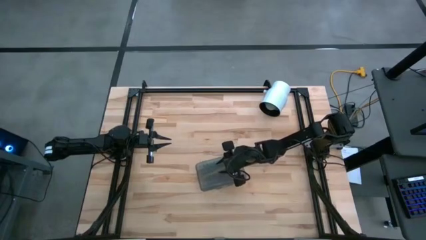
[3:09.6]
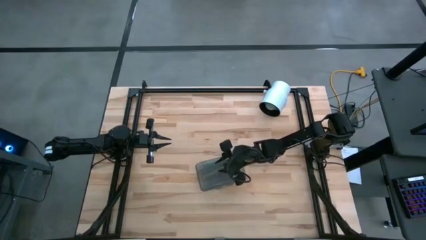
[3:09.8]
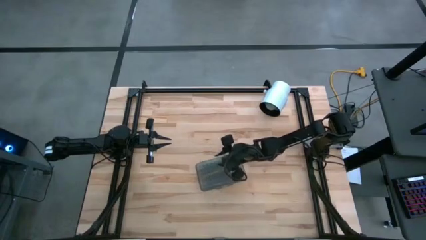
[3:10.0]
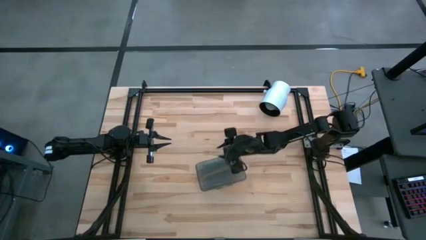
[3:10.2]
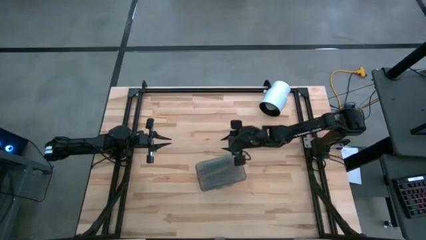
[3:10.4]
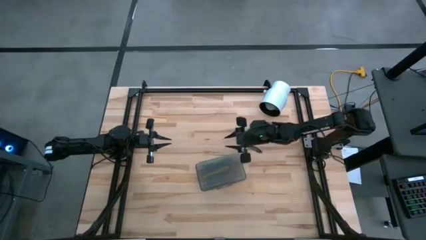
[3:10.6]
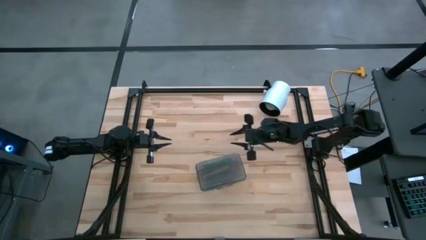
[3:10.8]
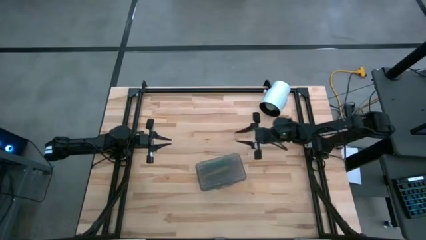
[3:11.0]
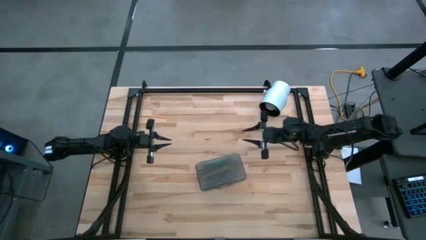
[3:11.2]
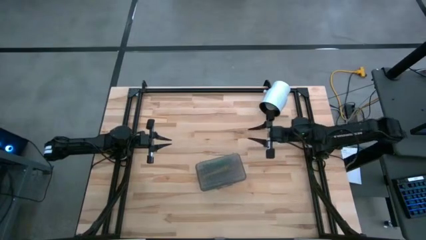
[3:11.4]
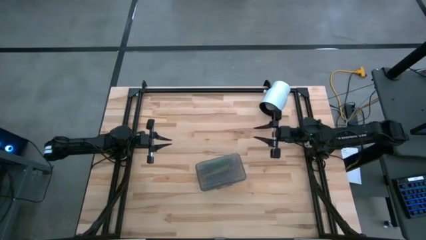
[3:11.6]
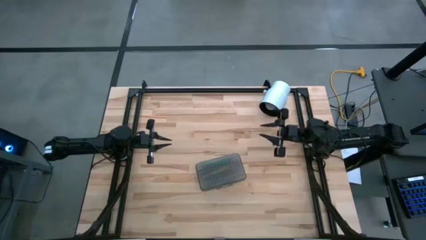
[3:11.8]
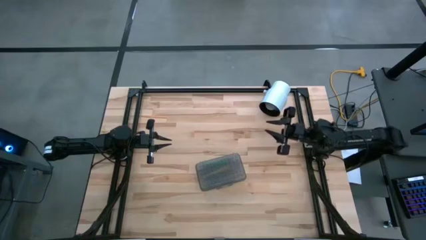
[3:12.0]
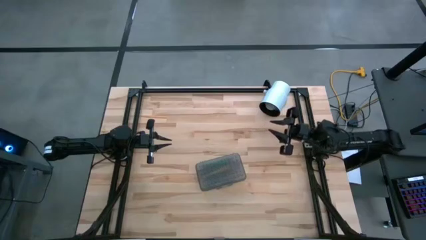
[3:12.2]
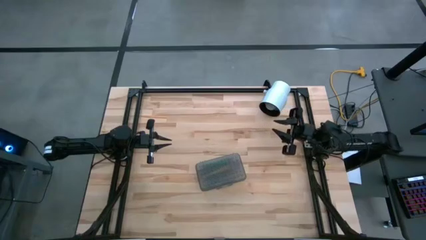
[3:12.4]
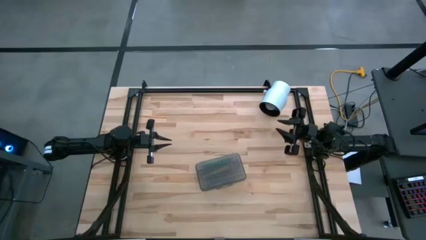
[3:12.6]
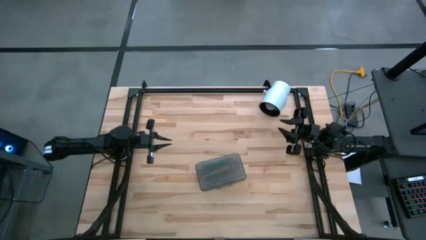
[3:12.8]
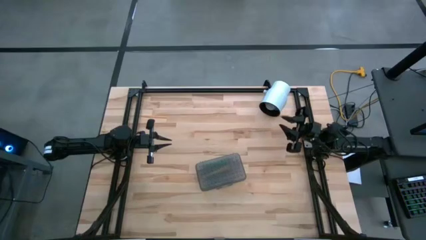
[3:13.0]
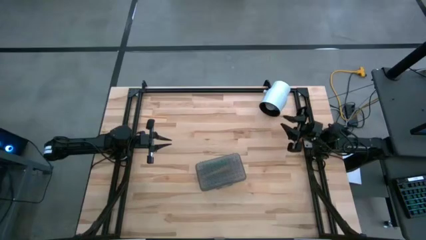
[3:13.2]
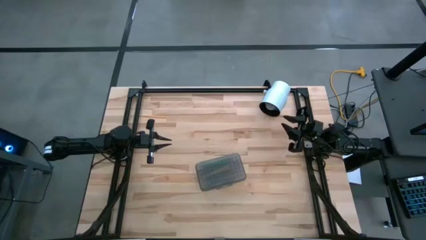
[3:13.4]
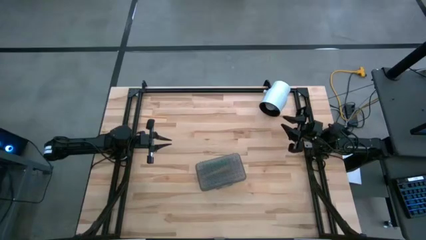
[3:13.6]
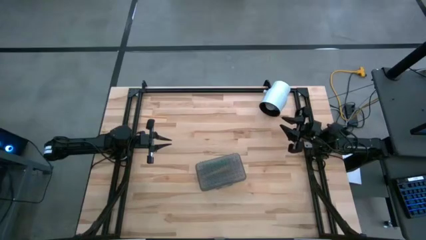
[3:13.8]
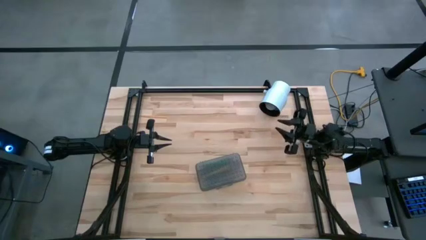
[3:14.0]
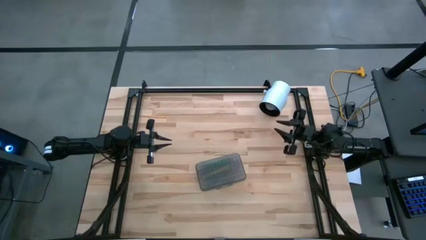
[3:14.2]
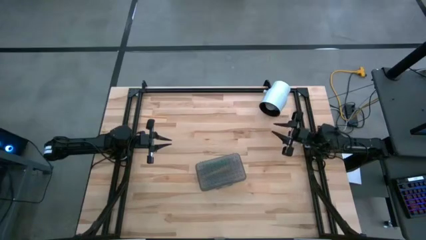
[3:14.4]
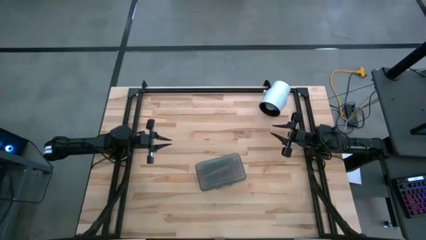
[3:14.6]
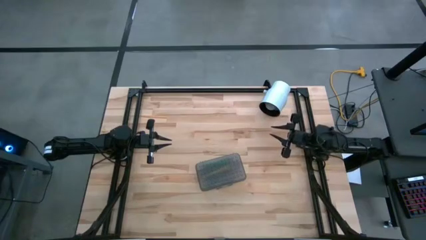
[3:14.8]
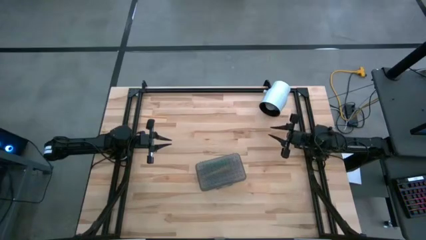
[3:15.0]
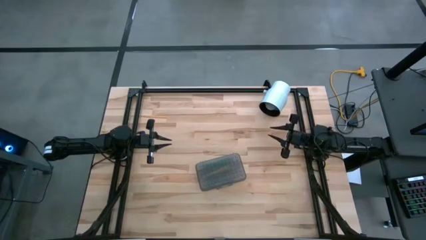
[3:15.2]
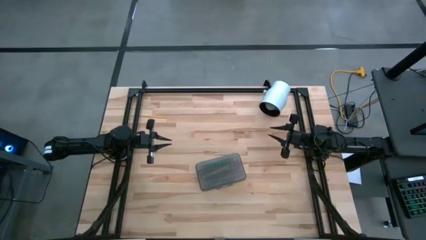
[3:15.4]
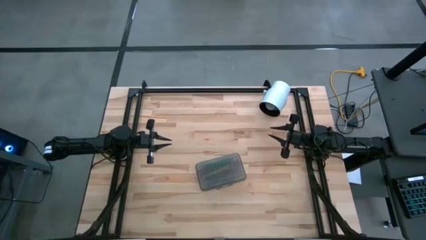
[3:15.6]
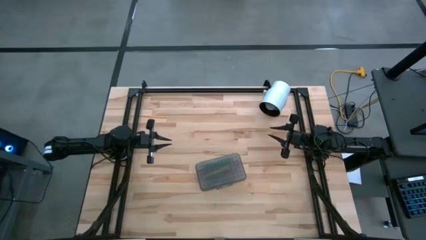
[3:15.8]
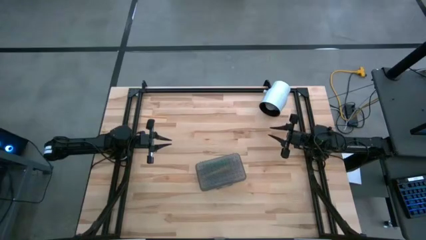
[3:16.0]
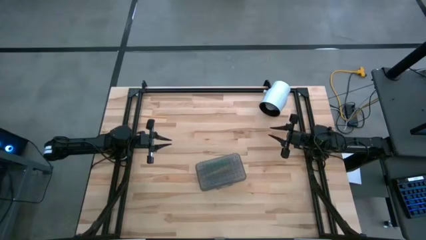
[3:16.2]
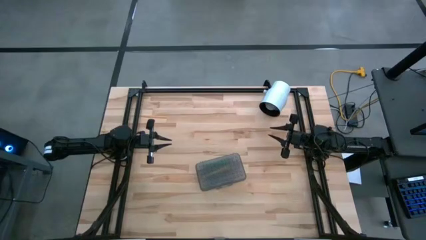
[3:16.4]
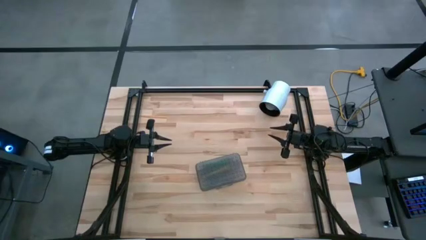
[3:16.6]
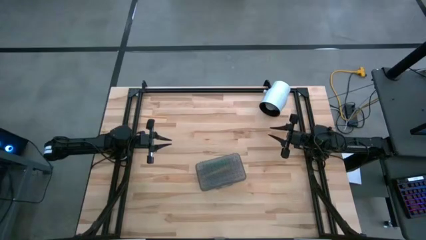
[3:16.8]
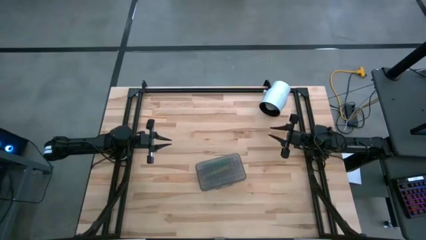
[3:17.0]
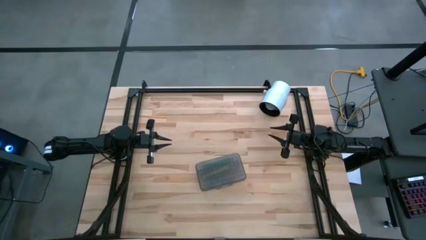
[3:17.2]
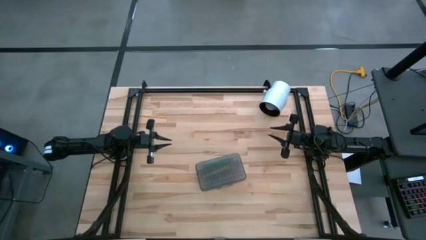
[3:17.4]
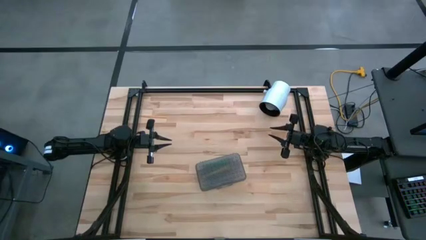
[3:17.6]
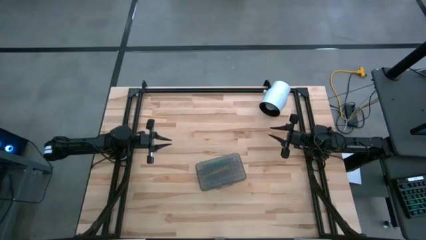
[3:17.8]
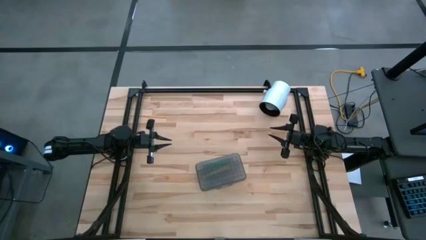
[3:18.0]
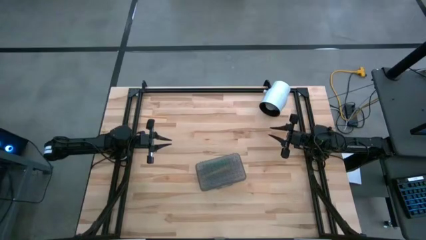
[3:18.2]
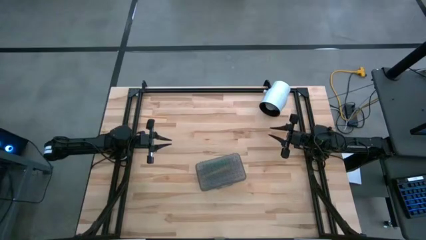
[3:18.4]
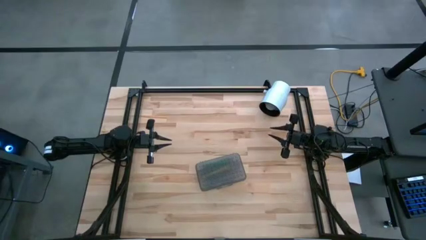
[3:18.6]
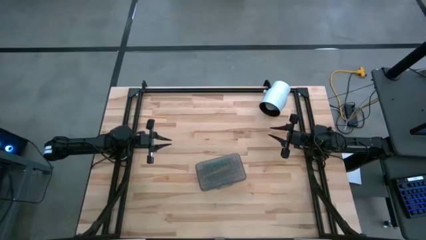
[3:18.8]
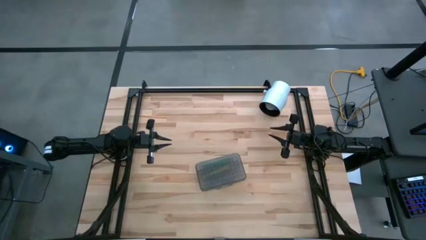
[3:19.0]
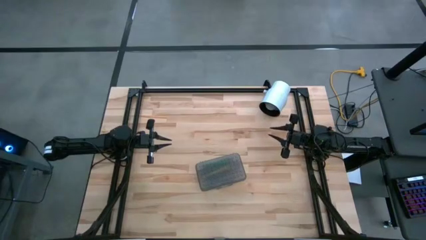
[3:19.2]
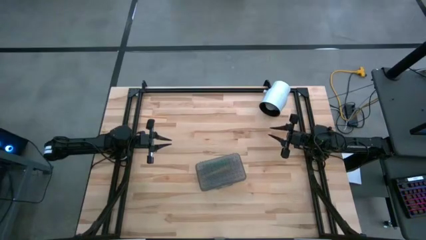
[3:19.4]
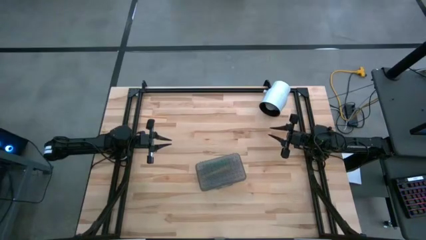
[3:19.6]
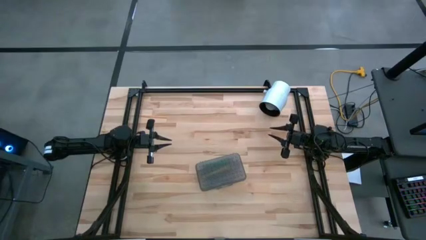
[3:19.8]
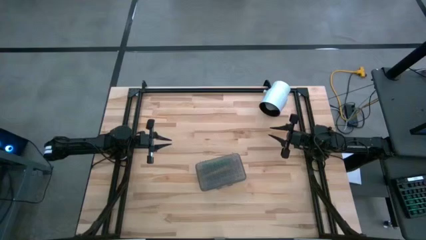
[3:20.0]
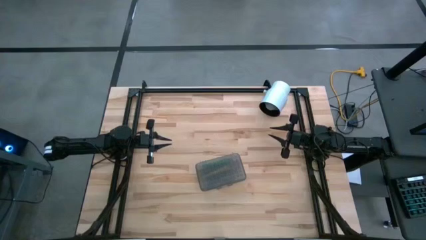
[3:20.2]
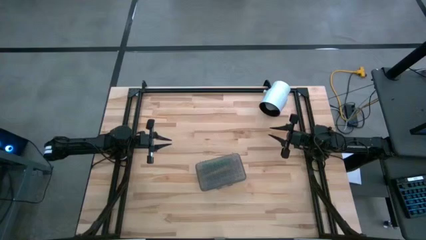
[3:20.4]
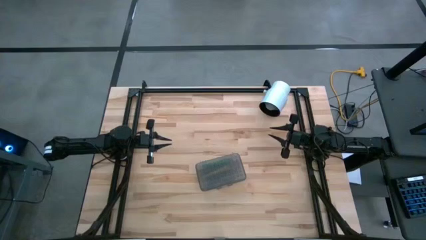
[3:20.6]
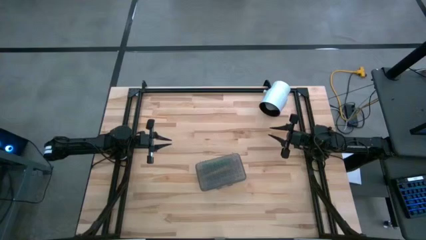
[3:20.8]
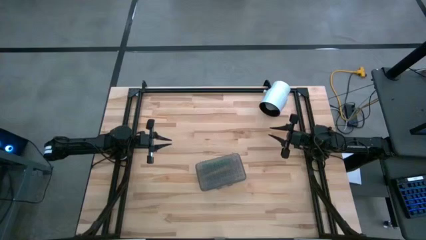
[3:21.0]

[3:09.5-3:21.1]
Task: Pick & place school supplies into a supply box
Return to Home Position

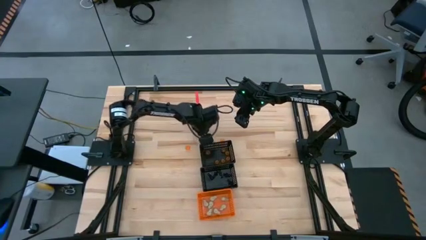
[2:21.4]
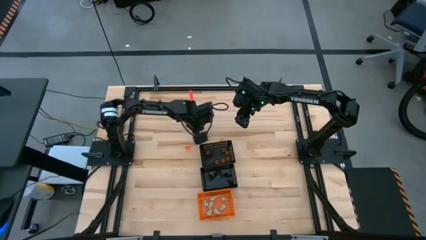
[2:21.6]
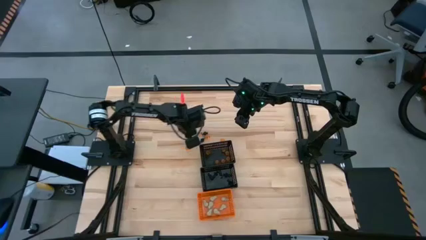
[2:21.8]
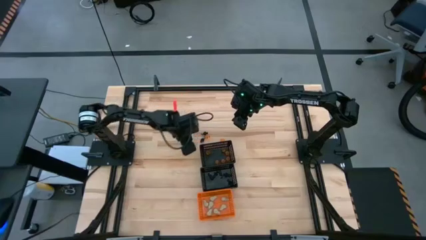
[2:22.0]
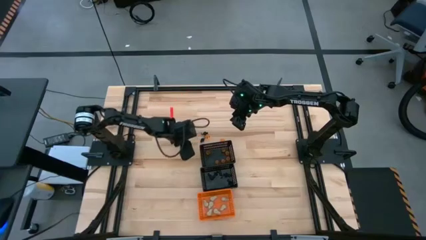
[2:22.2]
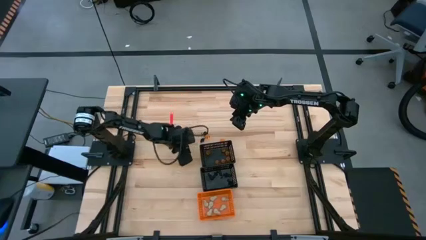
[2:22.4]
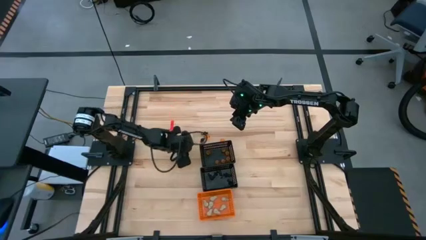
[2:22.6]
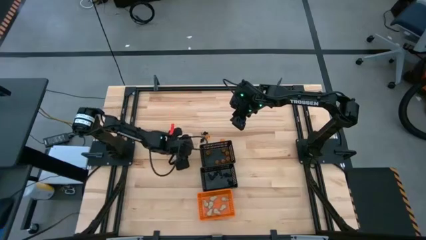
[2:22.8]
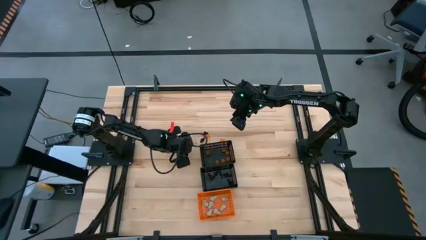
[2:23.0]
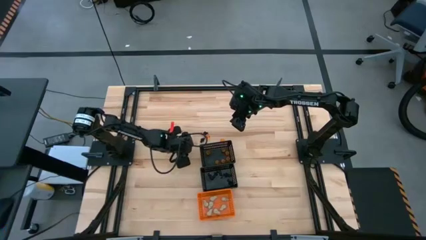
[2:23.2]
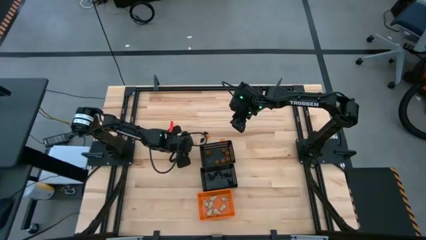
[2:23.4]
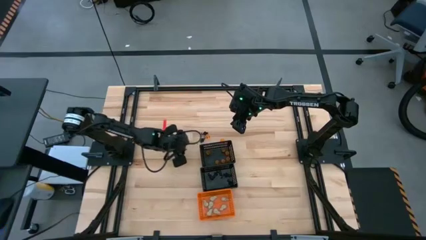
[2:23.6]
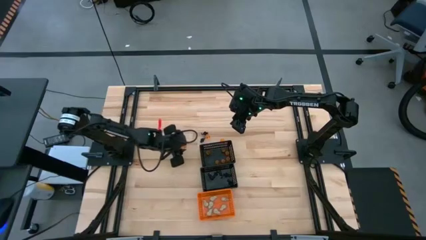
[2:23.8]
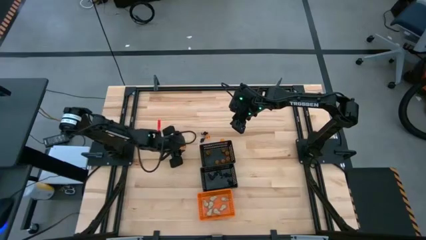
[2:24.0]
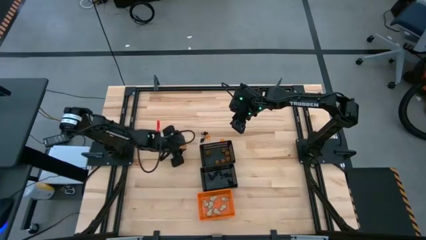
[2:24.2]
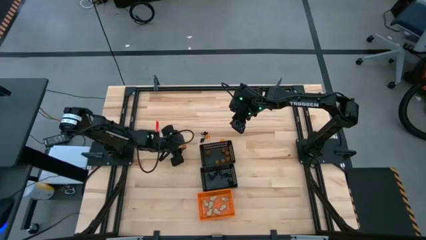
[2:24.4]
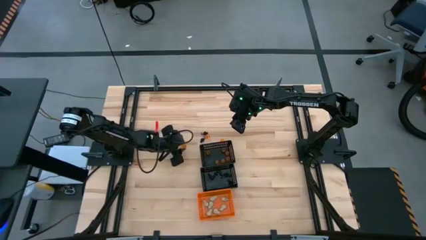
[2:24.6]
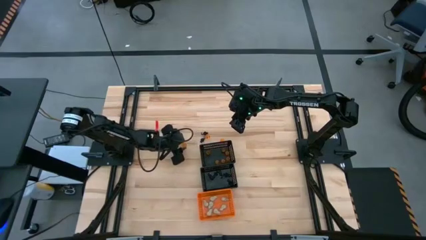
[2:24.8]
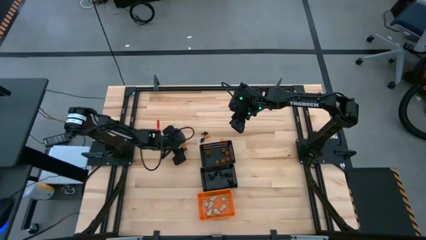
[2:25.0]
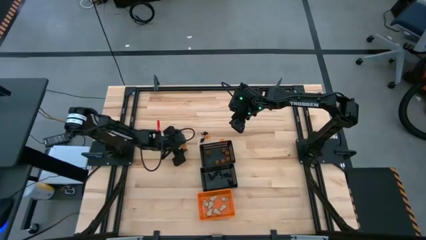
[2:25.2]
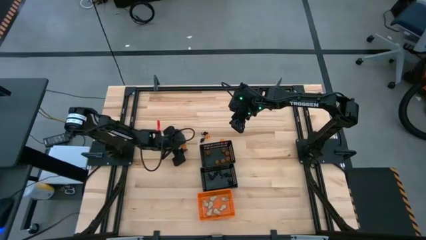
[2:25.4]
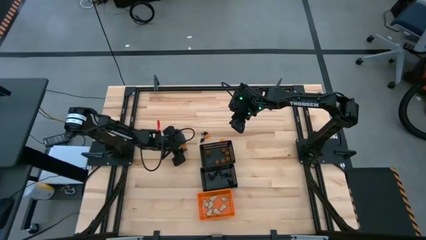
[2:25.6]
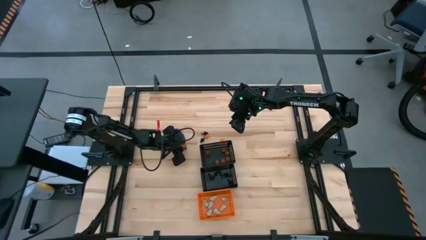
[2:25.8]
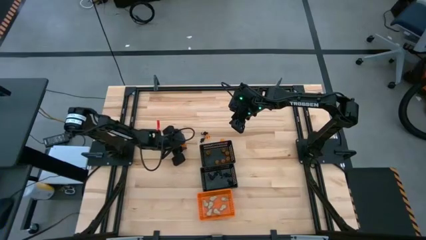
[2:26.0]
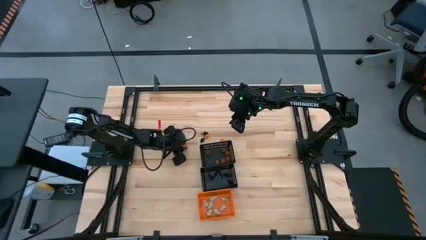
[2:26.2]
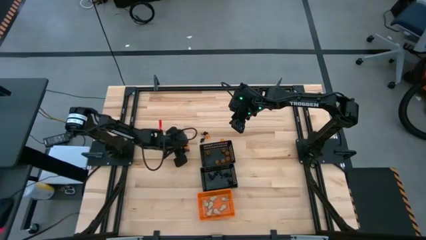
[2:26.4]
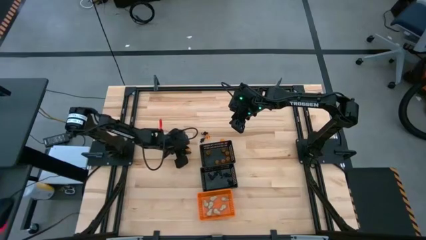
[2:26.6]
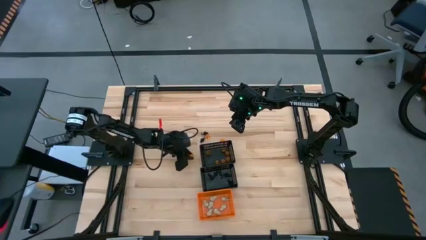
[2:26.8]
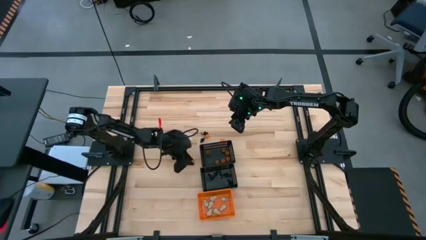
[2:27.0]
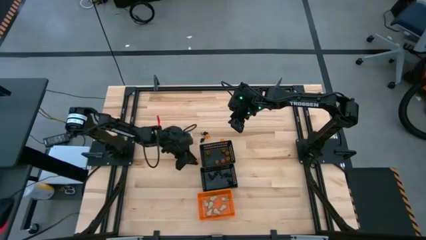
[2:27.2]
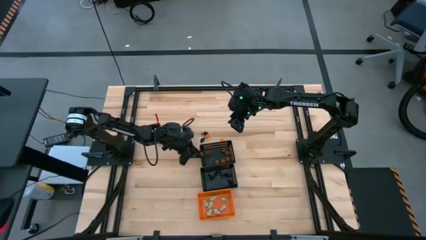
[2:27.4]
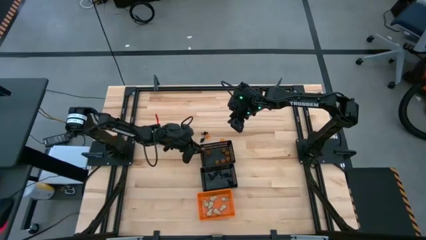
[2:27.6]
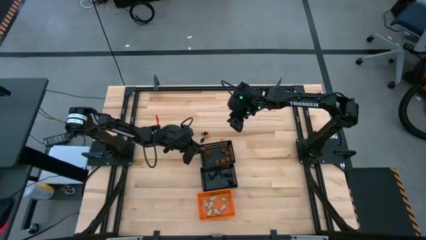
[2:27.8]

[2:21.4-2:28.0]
Task: Sort Halloween decoration
Put the orange pumpkin toy into the top black bin
